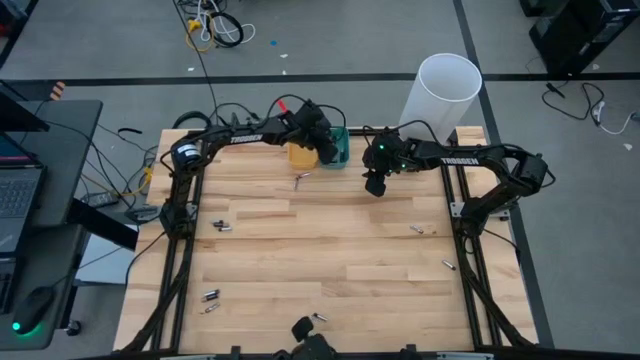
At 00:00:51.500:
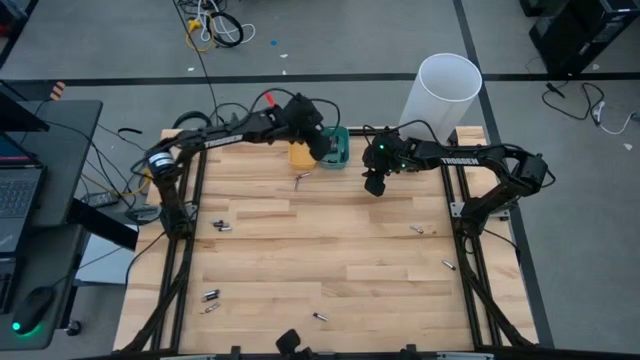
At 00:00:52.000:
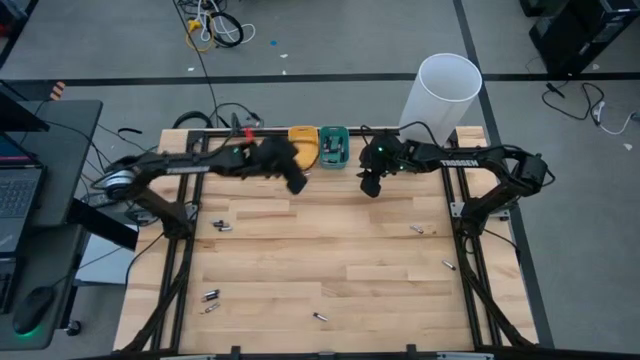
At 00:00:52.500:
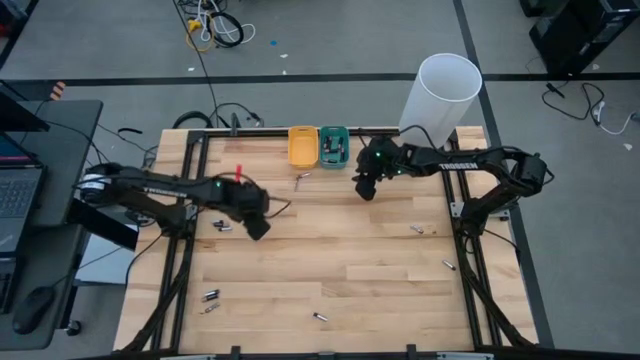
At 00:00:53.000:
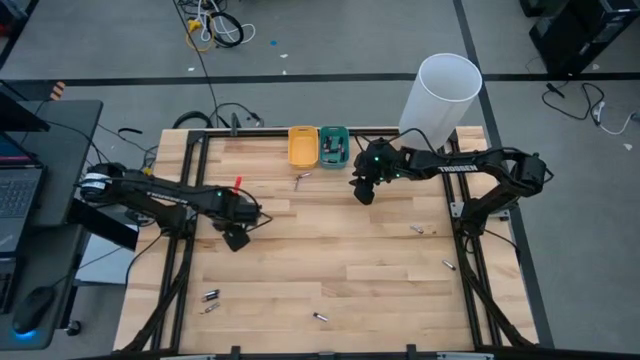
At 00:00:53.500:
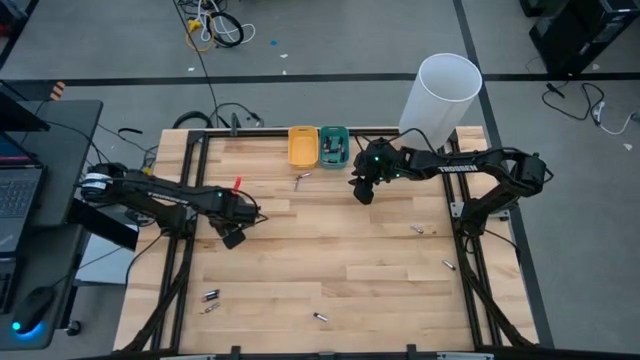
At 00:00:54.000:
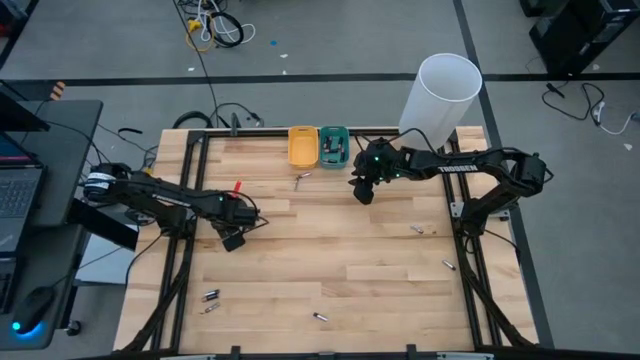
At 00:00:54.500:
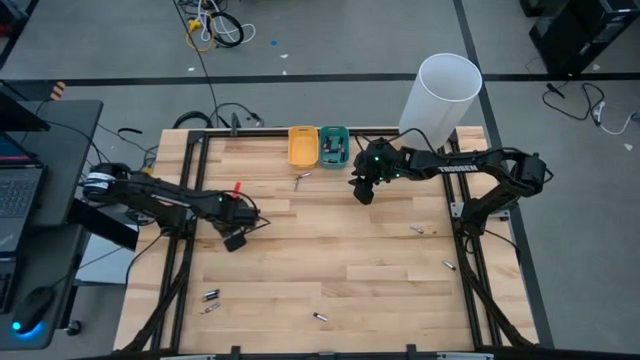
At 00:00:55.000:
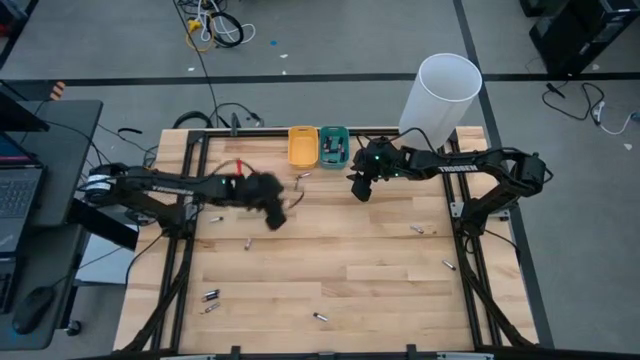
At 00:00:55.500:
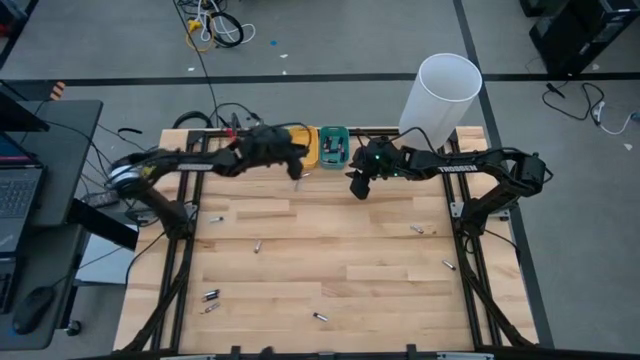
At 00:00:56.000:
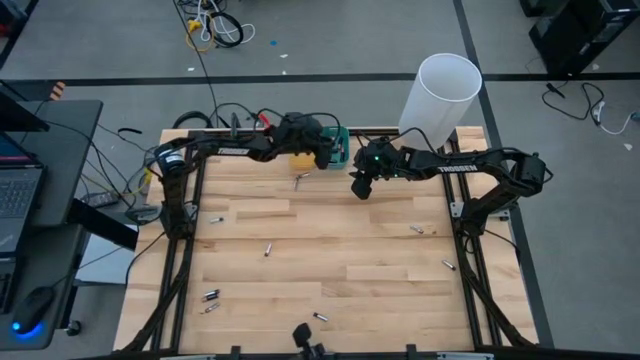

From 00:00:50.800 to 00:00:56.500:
Task: Sort batteries
Put the black battery into the green bin

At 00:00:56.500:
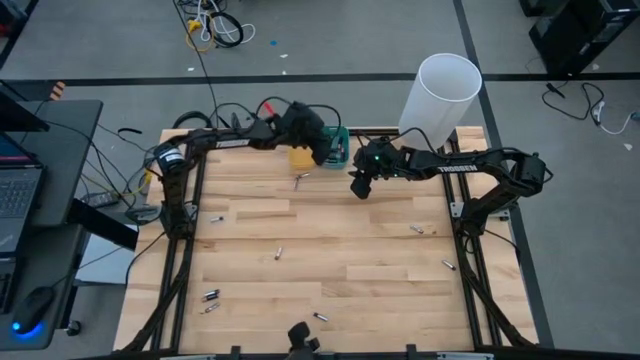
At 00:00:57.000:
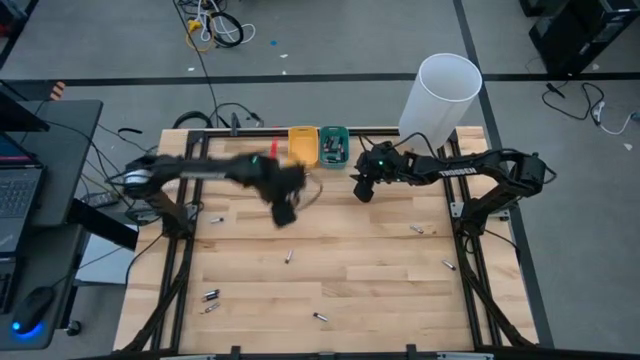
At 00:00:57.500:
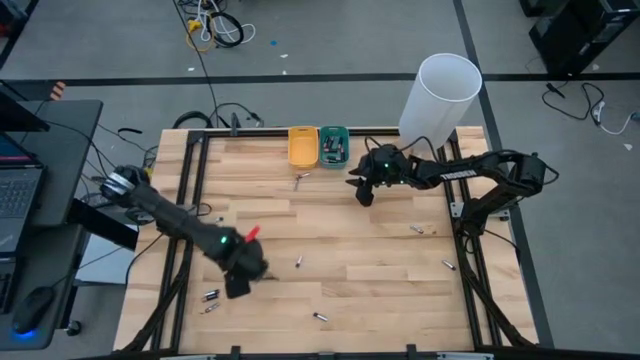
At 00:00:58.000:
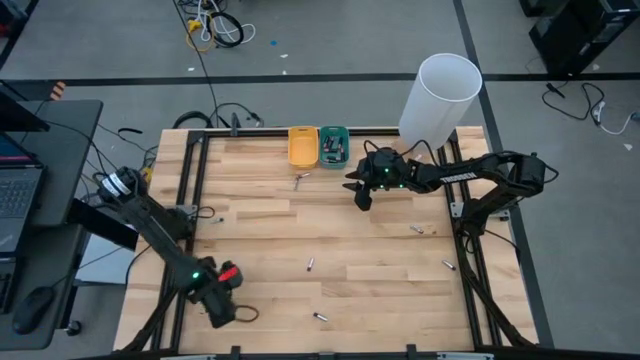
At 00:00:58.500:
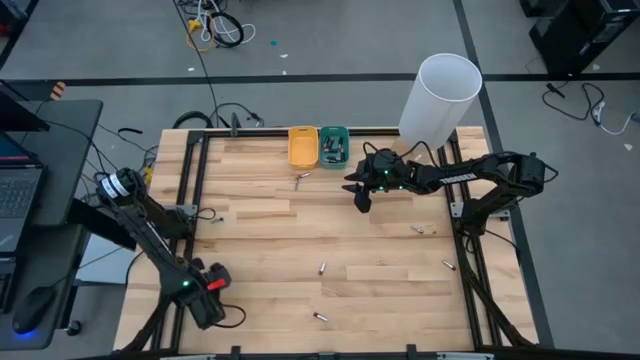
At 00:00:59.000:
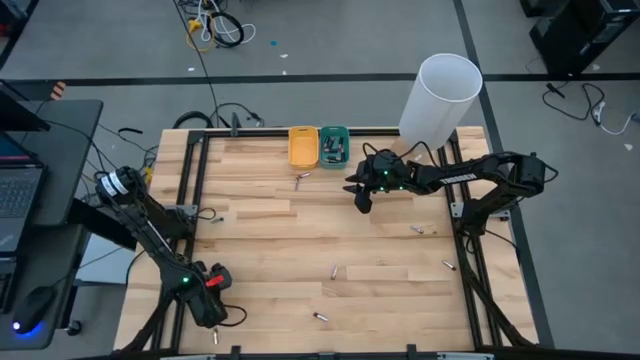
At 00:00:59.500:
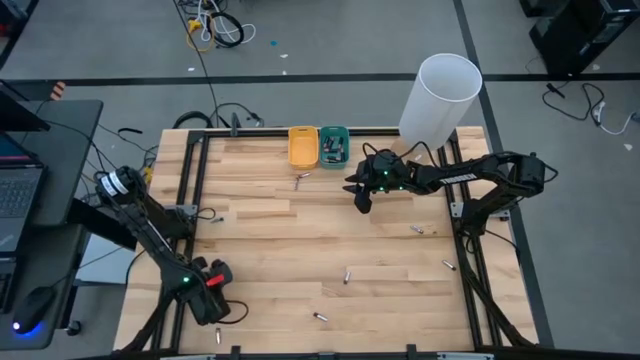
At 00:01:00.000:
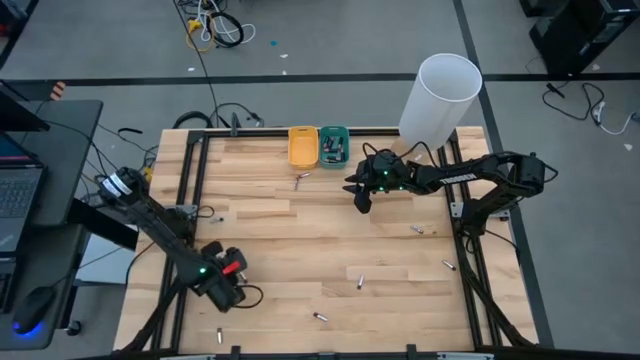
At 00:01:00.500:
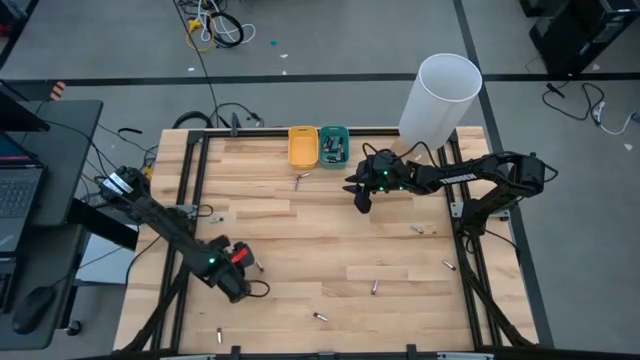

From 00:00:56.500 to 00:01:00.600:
Put the black battery into the green bin

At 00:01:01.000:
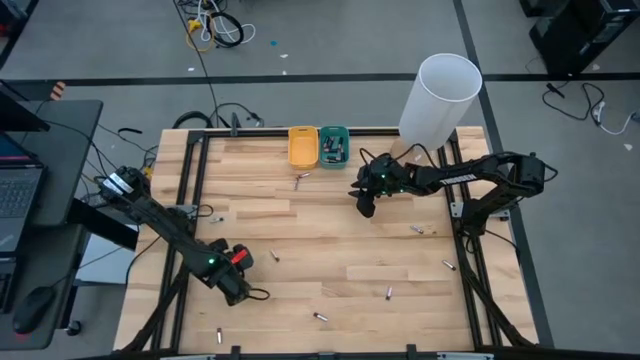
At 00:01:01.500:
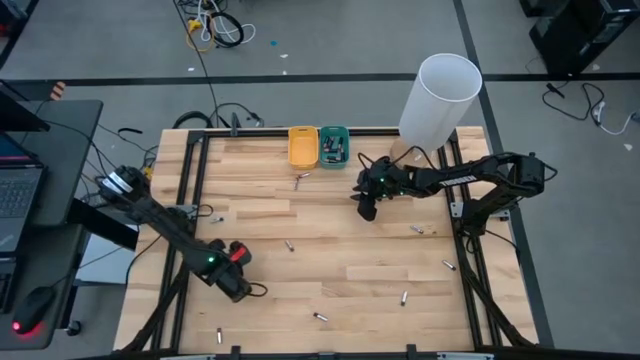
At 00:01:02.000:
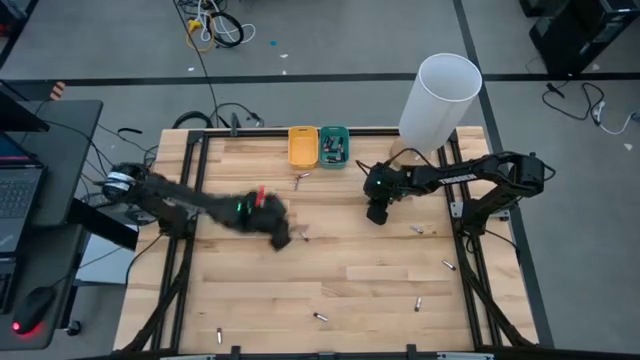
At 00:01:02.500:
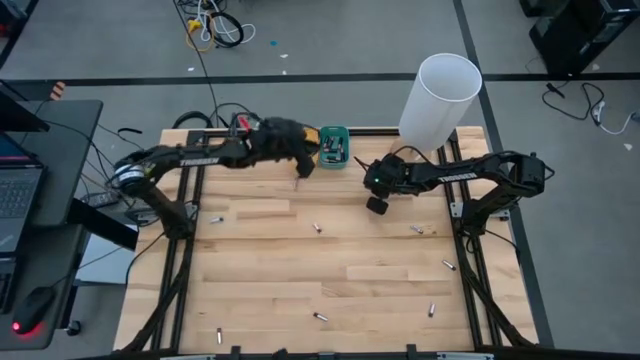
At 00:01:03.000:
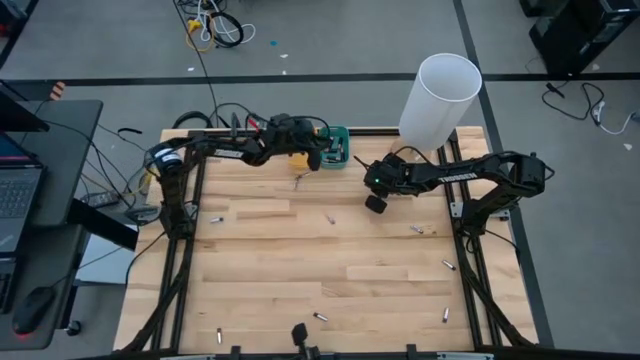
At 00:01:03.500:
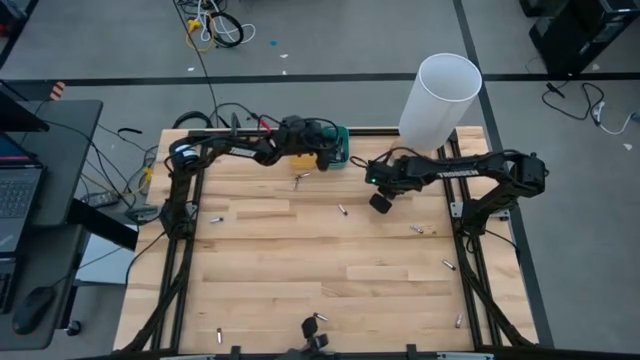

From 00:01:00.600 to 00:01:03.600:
Put the black battery into the green bin

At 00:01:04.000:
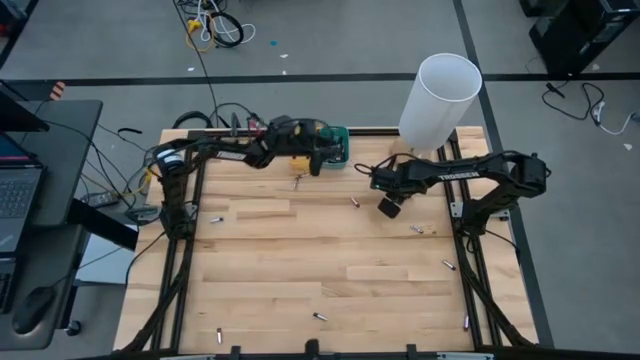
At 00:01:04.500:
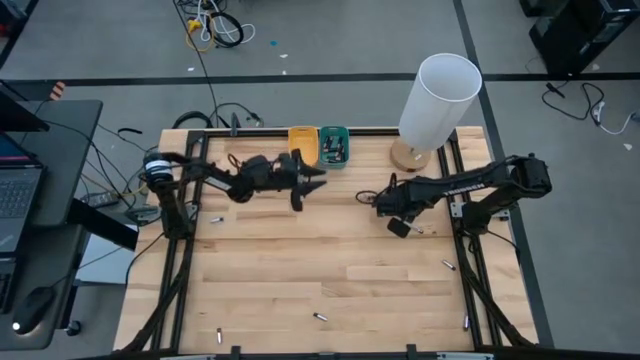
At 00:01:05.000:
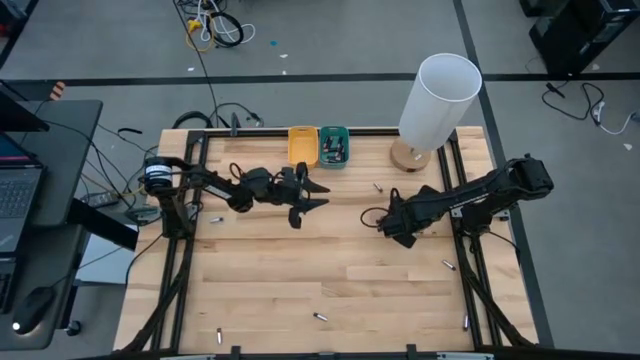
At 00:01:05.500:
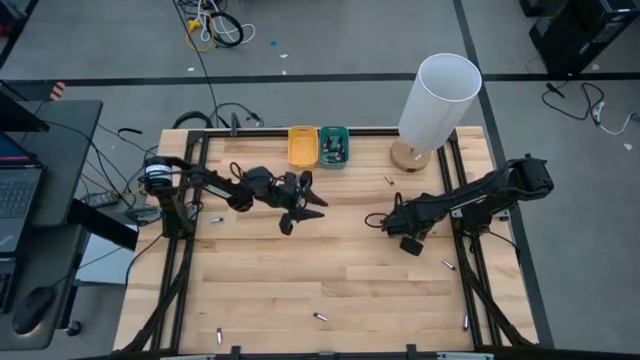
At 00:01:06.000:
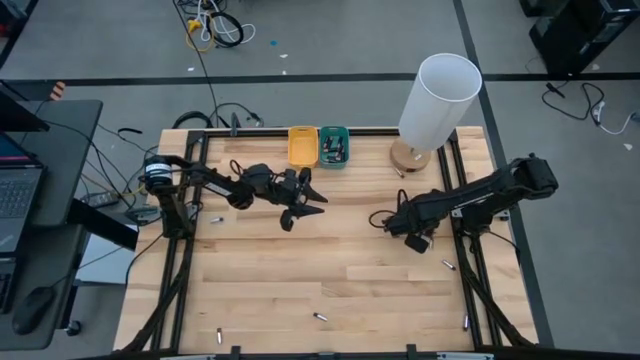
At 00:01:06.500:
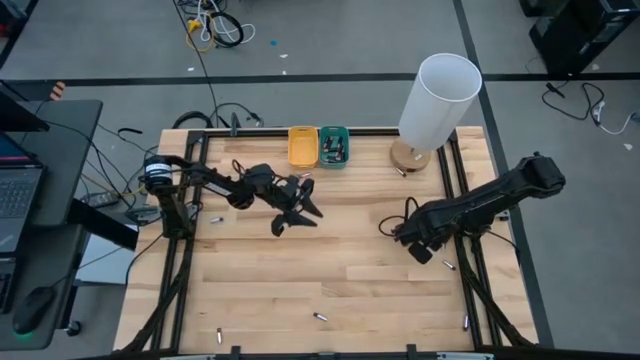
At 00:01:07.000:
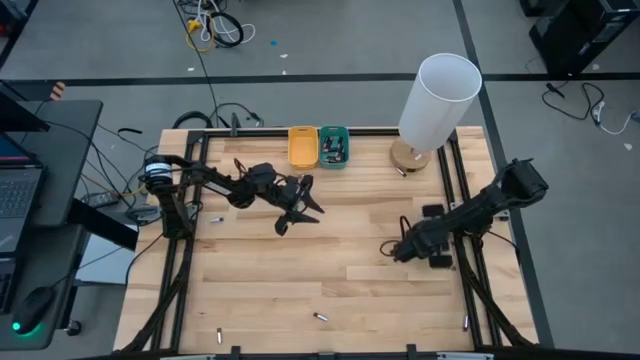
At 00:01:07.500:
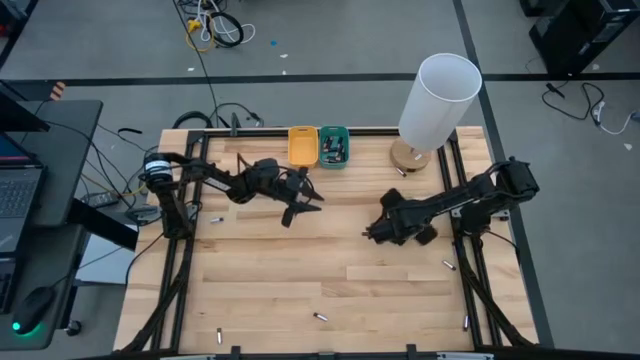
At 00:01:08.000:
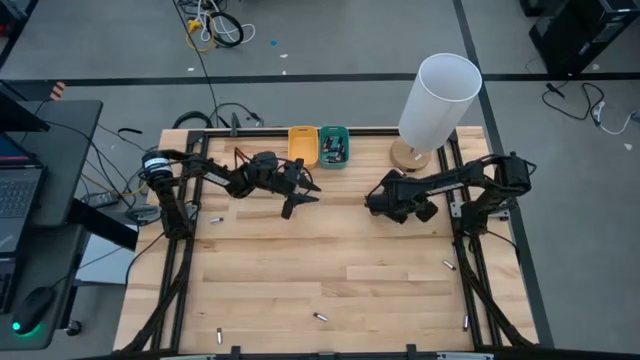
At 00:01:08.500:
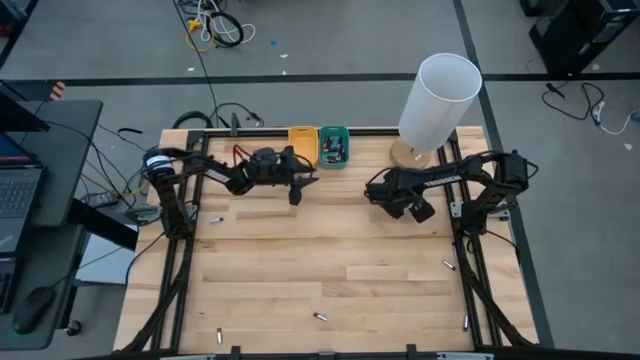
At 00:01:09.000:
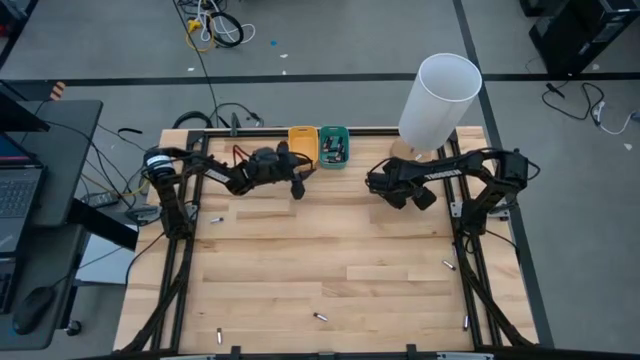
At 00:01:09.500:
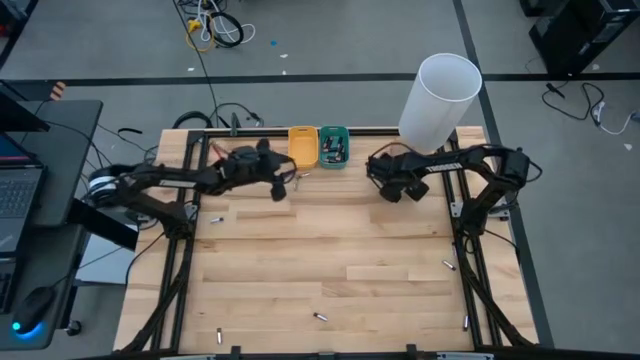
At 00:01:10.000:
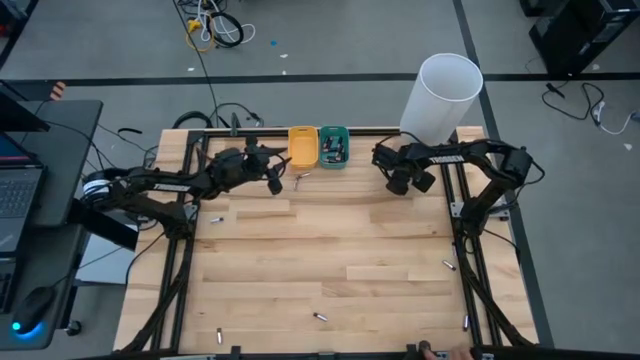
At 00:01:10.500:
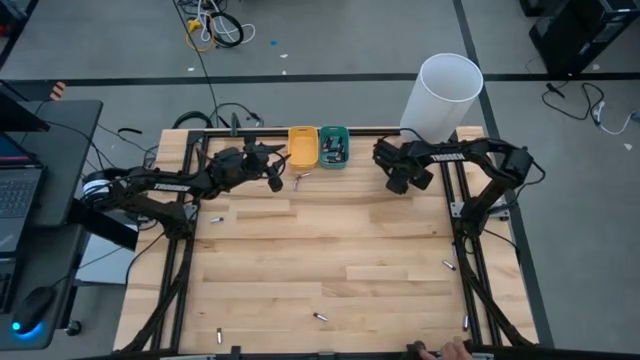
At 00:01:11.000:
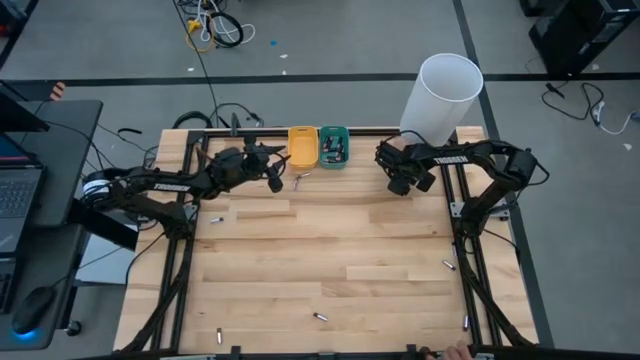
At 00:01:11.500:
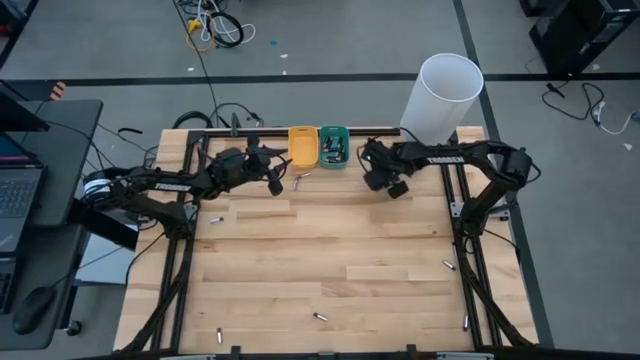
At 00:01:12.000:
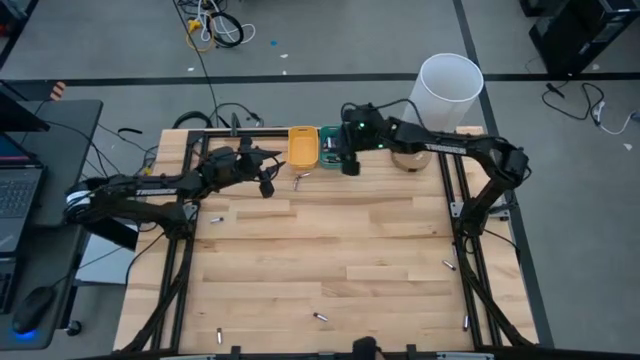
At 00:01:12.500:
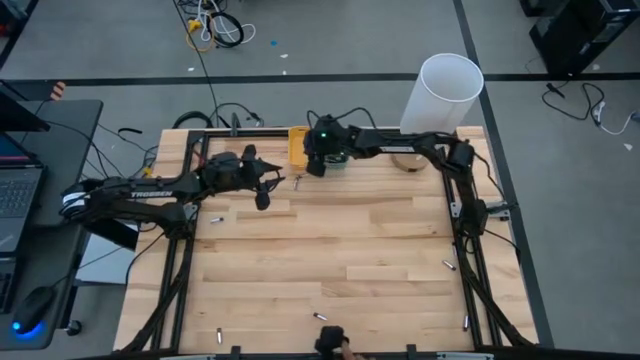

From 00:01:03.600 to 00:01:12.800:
Put the silver battery into the yellow bin
